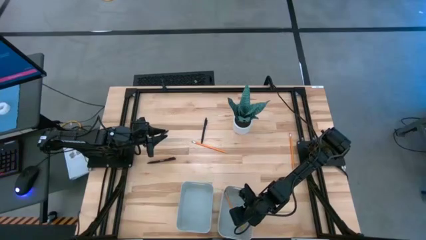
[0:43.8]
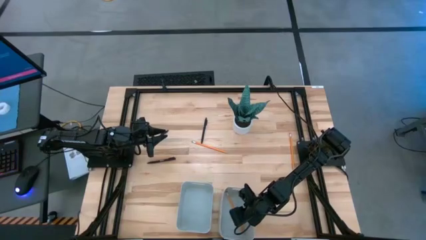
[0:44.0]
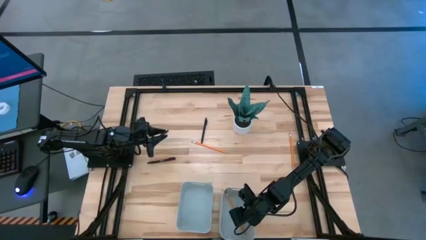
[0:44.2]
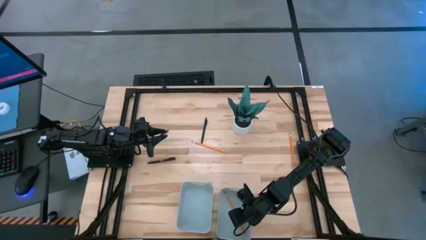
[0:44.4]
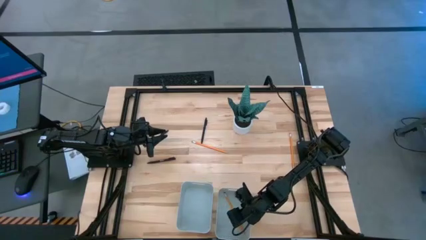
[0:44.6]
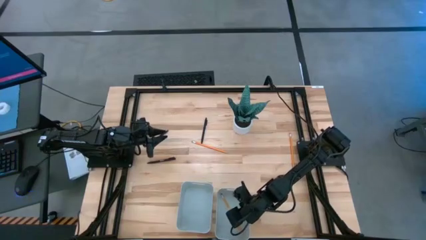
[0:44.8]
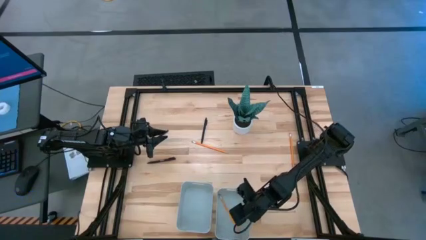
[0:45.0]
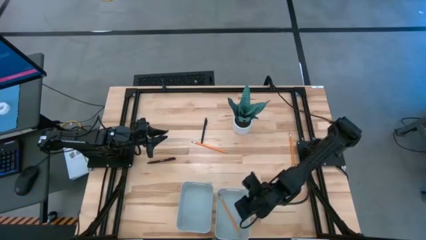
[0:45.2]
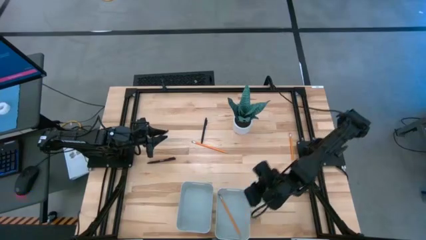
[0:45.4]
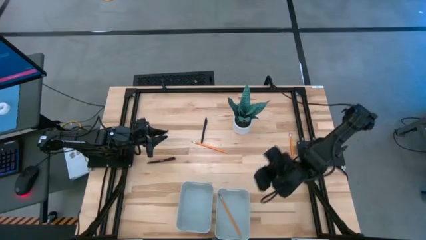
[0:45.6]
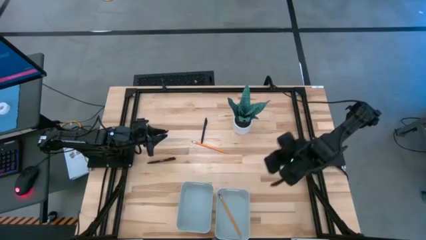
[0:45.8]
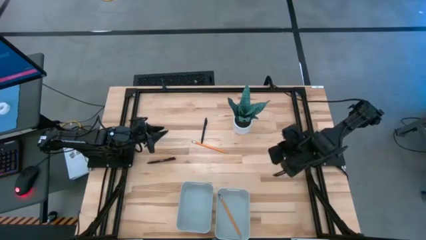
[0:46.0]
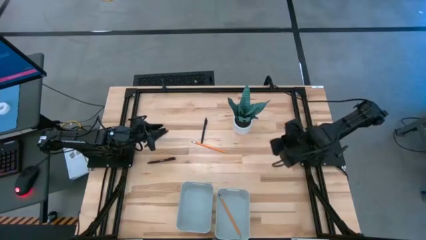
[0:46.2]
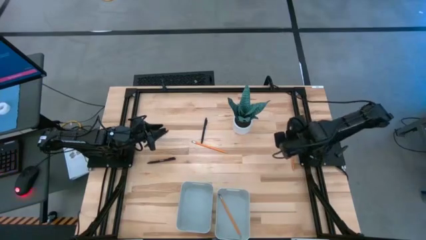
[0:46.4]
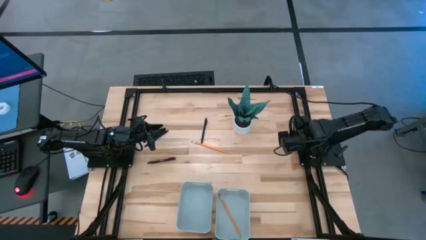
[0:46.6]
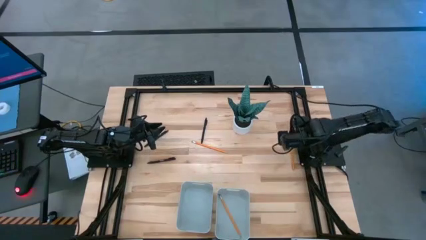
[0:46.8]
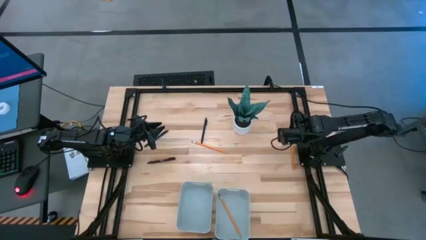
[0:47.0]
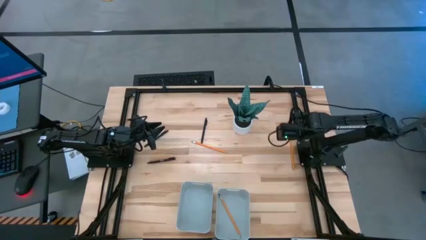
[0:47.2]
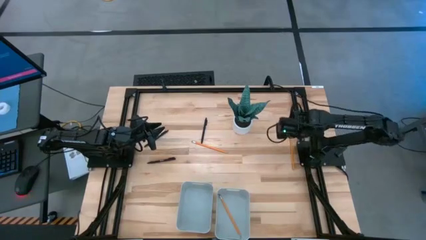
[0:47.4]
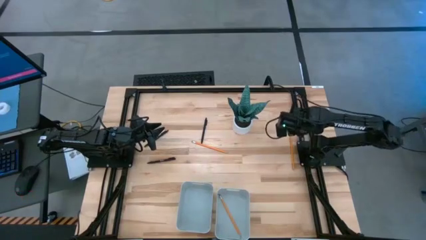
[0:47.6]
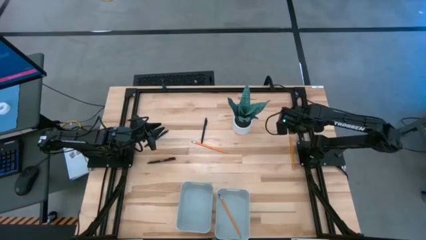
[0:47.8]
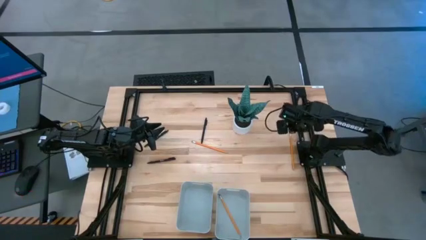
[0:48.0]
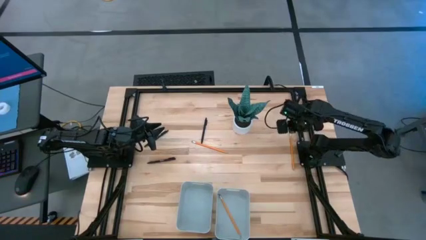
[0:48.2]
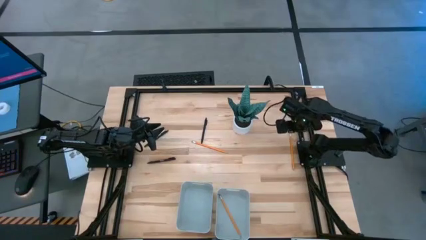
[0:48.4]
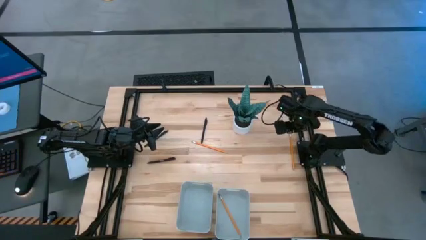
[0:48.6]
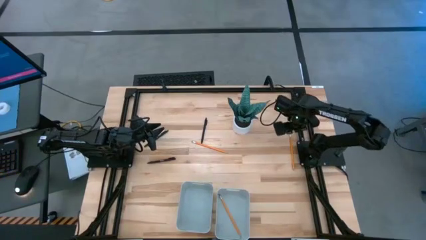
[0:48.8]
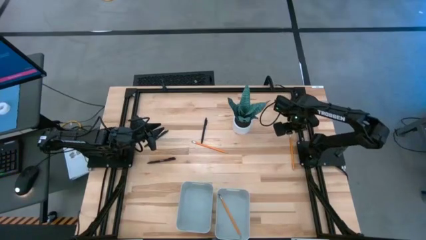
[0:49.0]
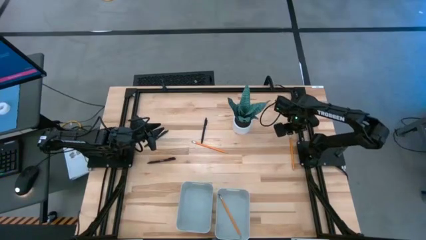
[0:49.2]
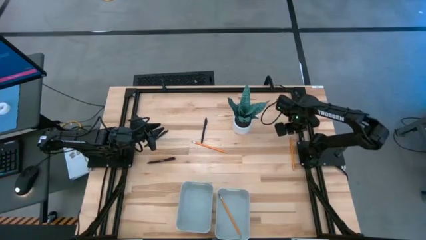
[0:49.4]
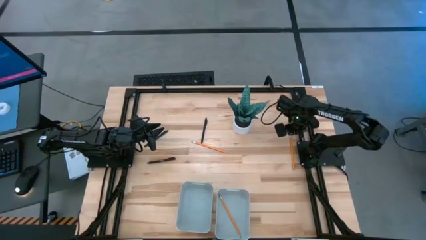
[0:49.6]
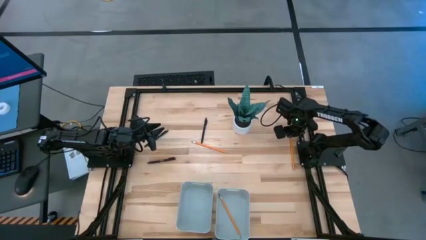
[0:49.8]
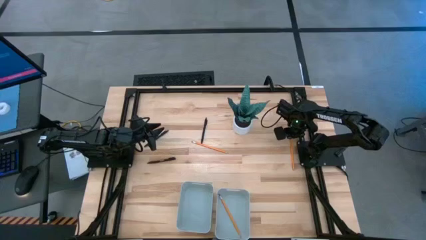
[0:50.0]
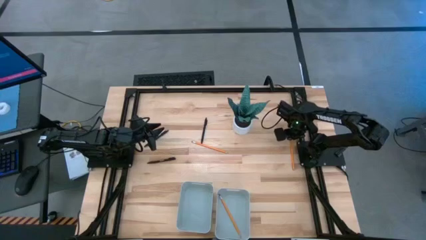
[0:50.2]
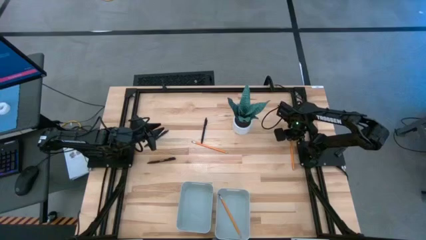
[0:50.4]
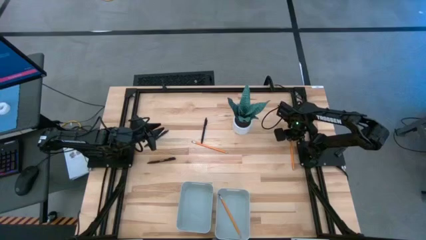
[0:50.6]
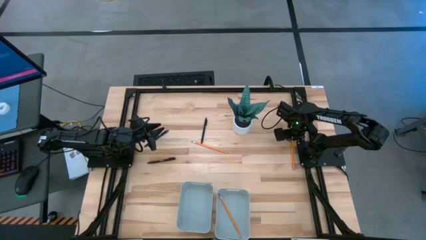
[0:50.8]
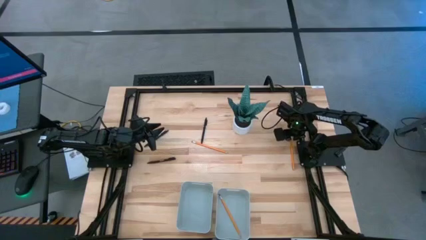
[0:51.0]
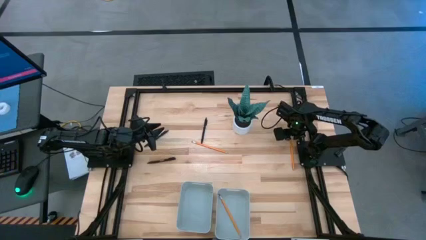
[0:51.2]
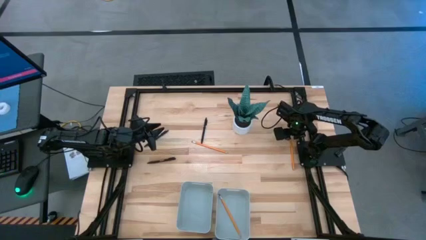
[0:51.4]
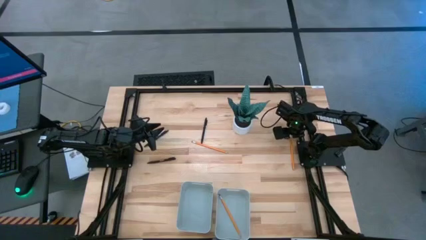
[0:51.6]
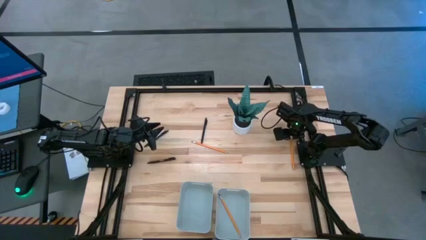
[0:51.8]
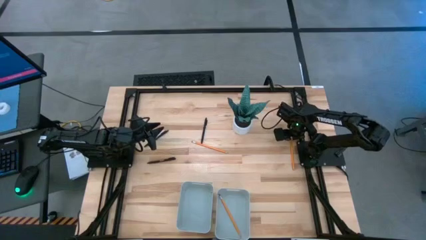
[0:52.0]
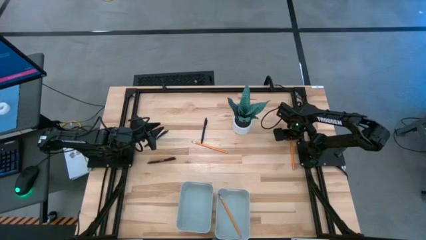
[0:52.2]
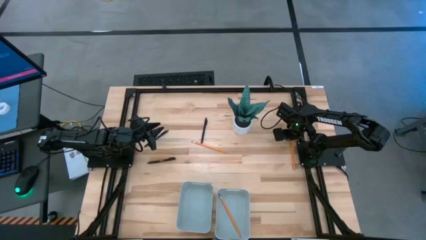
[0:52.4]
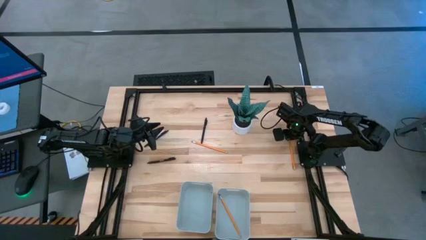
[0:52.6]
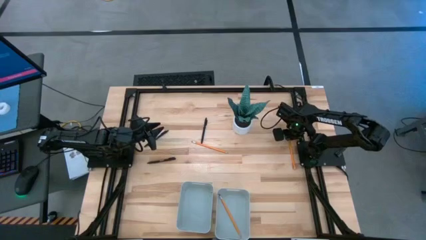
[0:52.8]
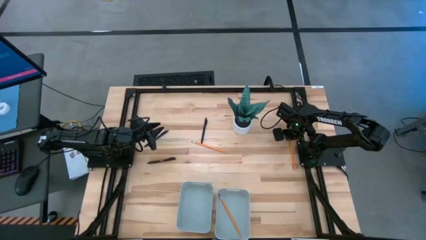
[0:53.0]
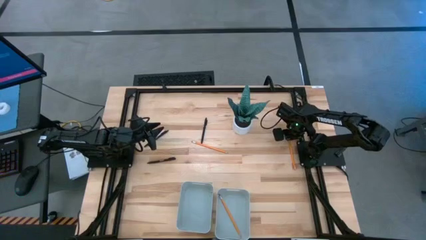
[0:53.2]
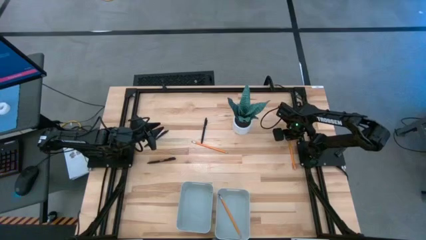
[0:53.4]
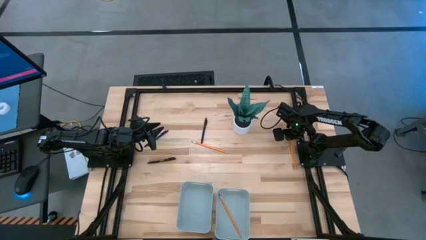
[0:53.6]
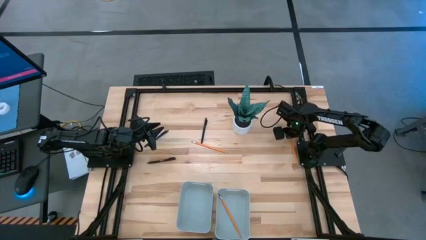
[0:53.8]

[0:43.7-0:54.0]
Task: Sort pens & pencils
Put the right pencil into the right gray bin

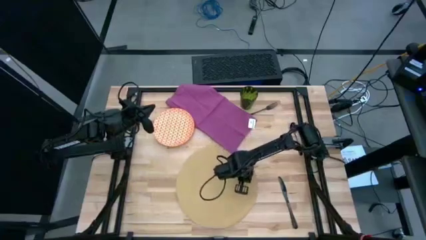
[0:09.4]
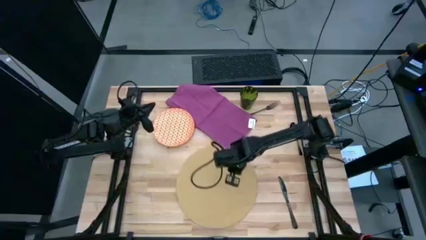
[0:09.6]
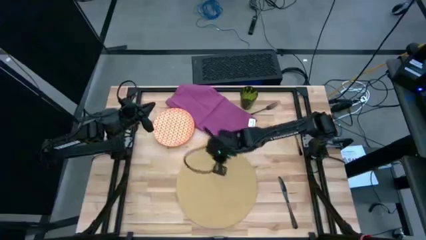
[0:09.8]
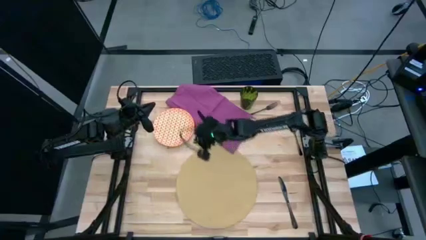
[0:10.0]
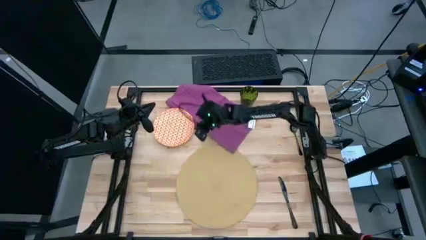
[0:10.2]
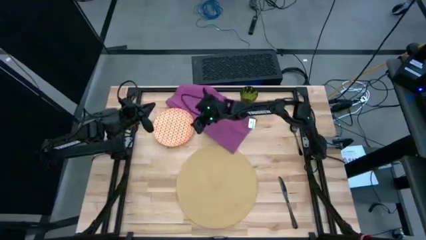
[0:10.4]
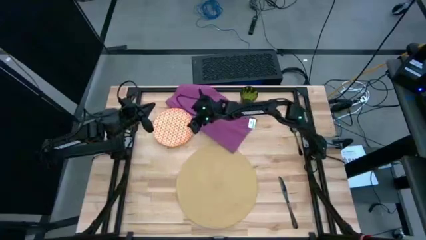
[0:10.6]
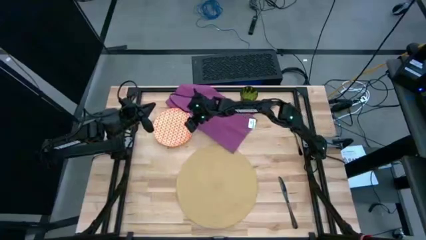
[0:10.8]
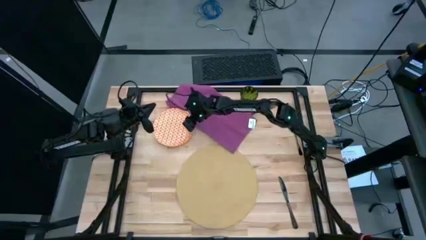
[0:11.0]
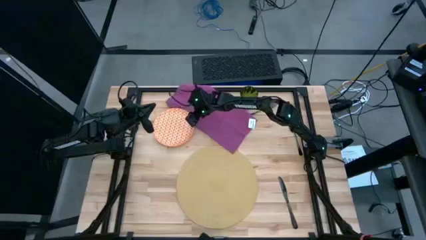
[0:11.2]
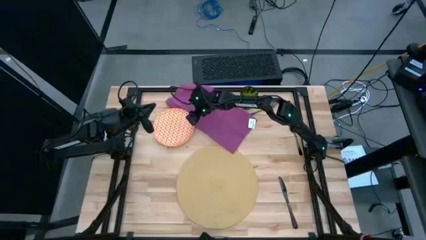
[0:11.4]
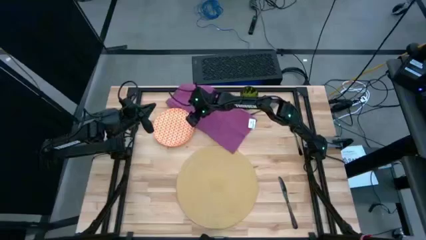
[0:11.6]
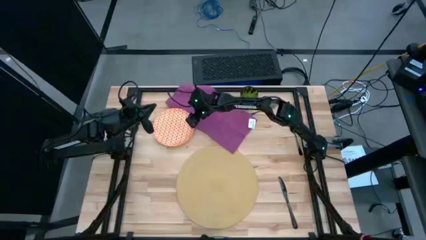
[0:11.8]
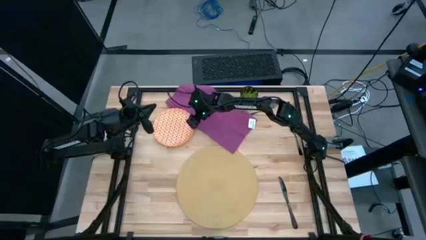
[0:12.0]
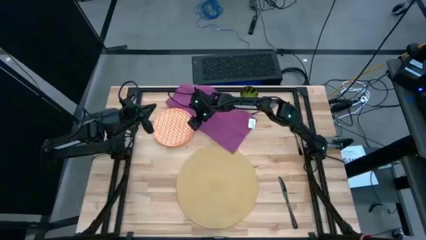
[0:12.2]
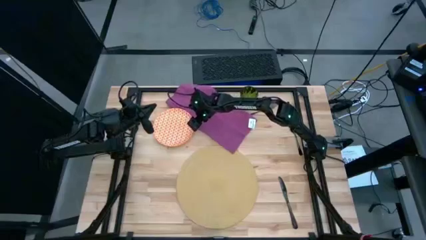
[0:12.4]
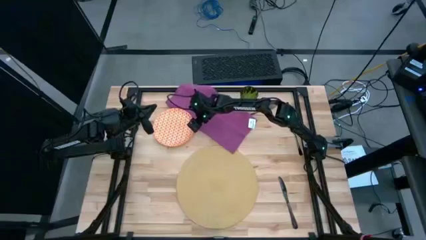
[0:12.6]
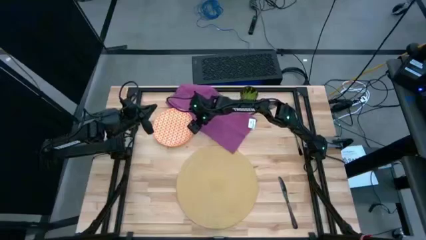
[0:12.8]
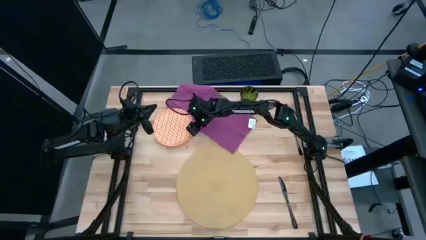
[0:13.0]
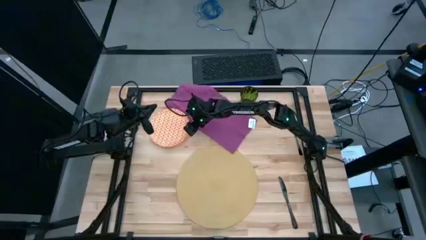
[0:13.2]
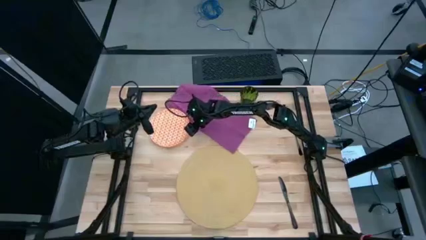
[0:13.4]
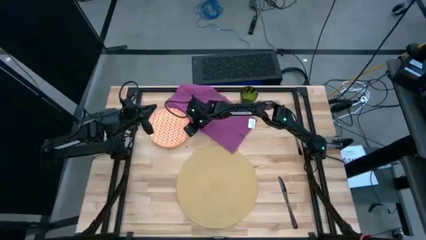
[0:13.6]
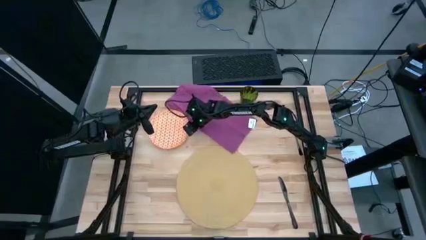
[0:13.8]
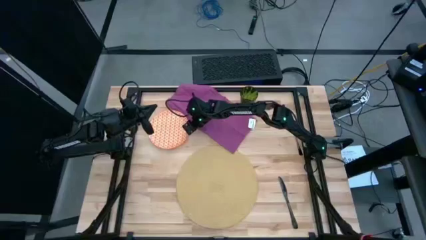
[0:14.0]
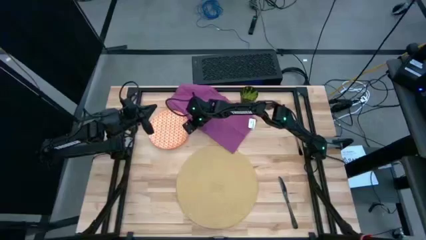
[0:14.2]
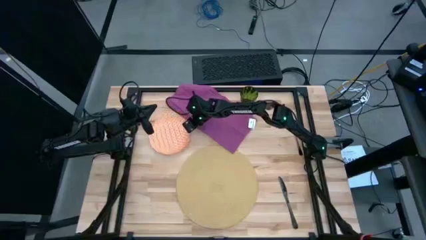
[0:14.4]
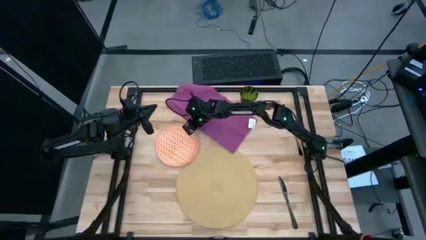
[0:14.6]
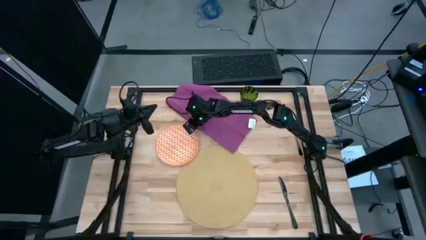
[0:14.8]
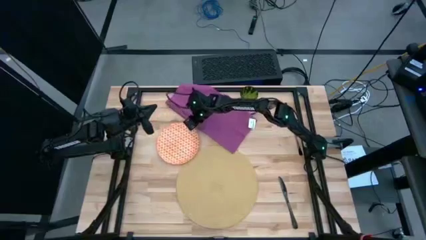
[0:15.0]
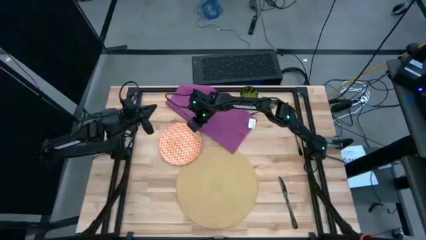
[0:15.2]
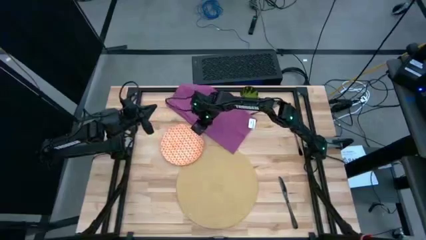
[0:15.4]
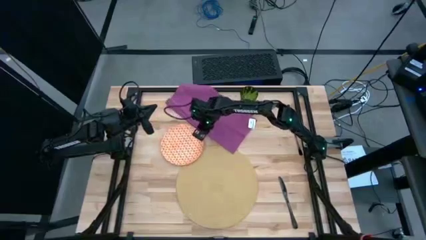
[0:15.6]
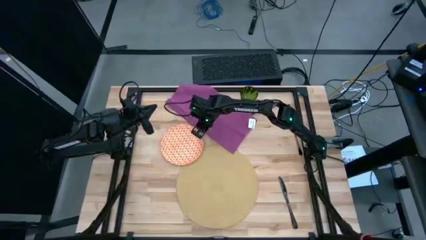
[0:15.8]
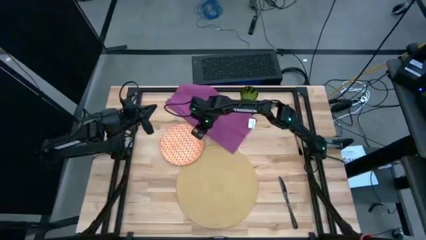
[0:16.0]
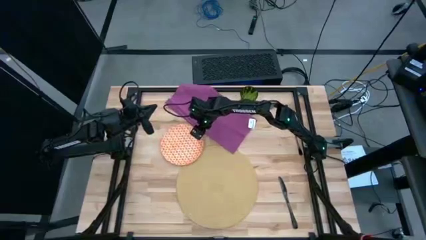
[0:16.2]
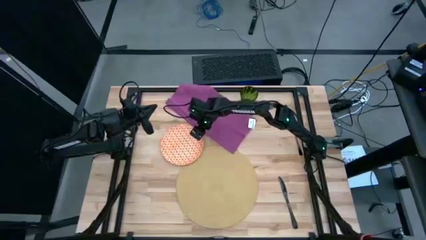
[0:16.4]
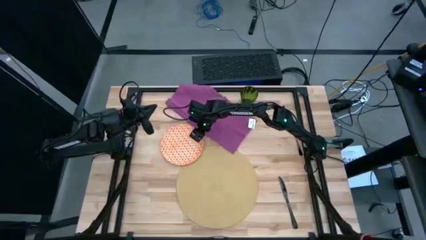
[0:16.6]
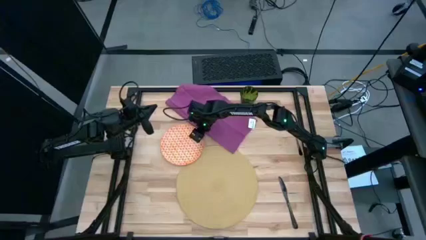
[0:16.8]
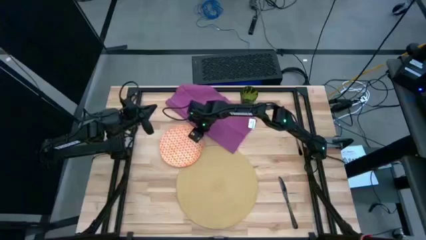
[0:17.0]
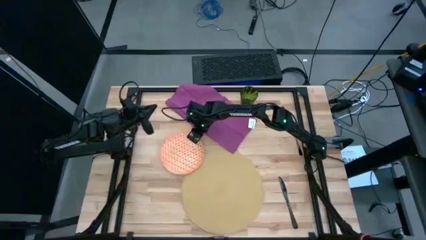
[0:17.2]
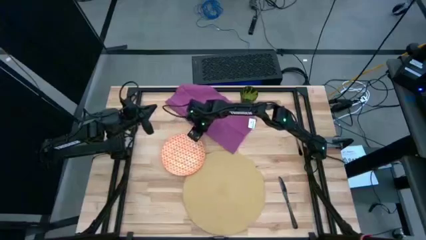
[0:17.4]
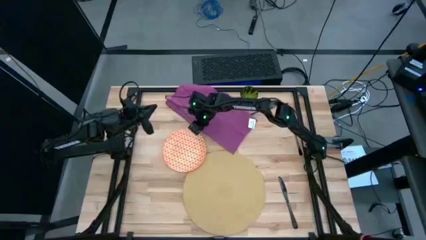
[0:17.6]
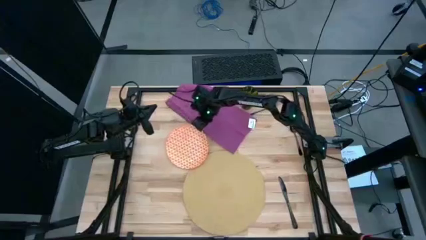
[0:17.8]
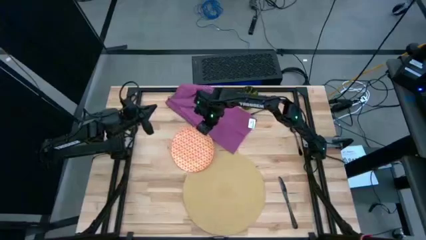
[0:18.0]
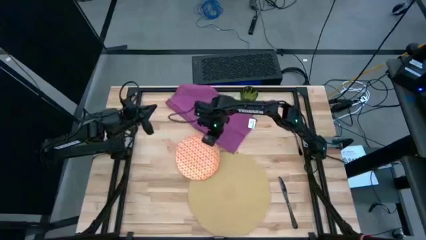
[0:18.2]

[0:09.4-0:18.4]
Task: Set table place
Put the orange plate on the brown table mat
